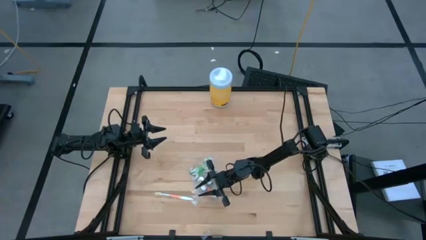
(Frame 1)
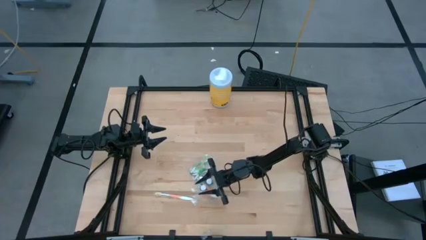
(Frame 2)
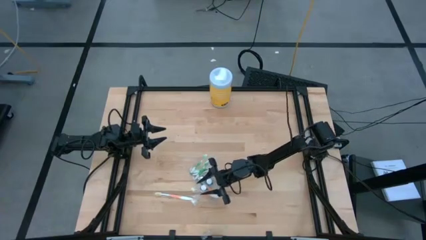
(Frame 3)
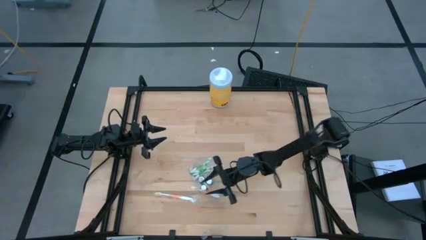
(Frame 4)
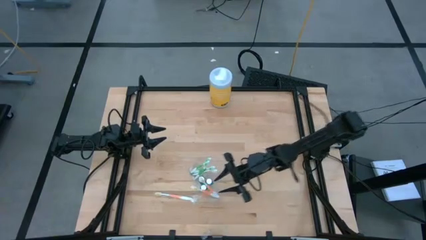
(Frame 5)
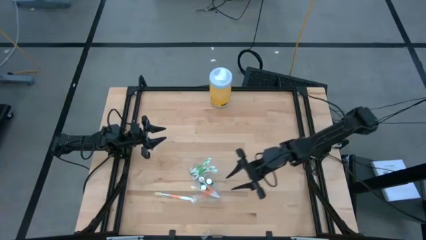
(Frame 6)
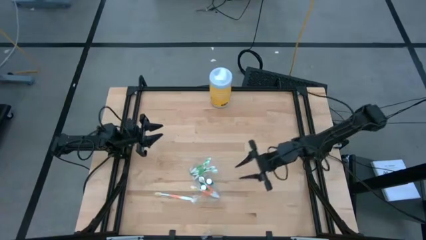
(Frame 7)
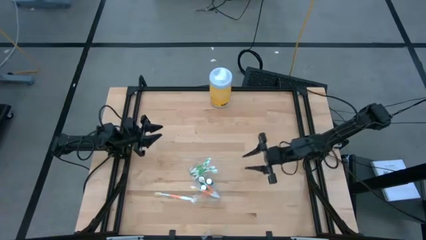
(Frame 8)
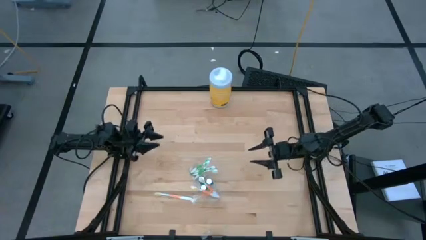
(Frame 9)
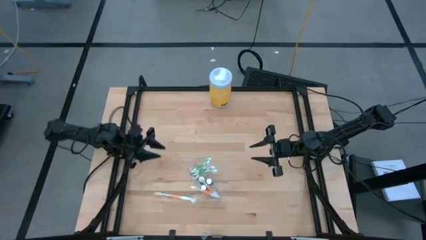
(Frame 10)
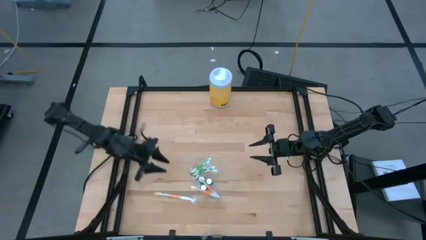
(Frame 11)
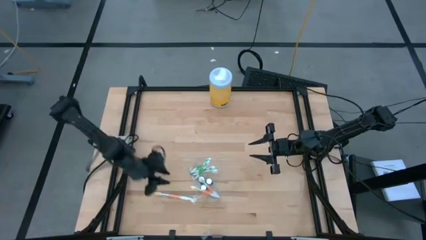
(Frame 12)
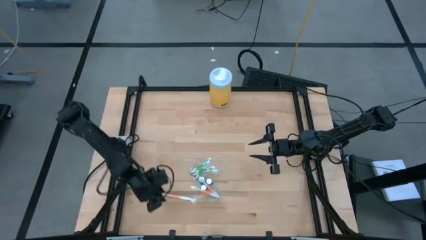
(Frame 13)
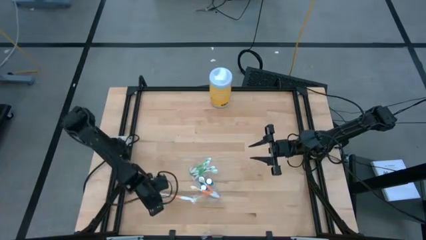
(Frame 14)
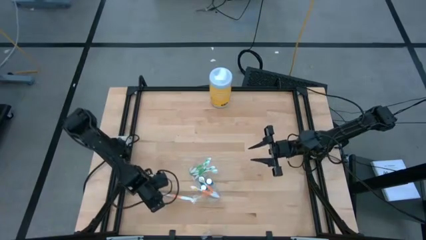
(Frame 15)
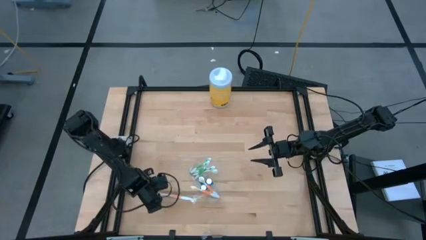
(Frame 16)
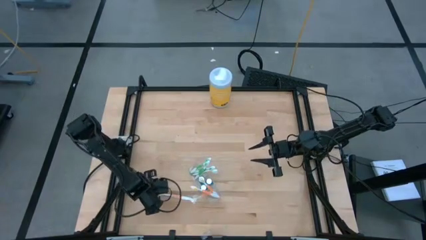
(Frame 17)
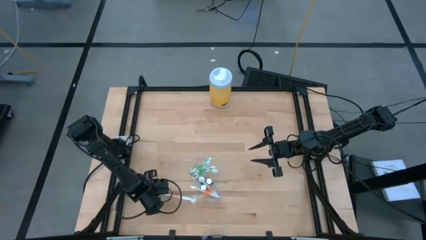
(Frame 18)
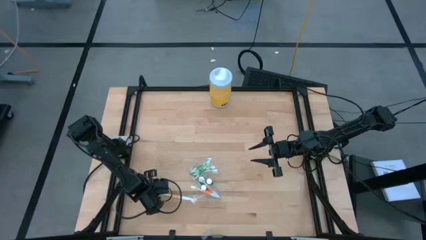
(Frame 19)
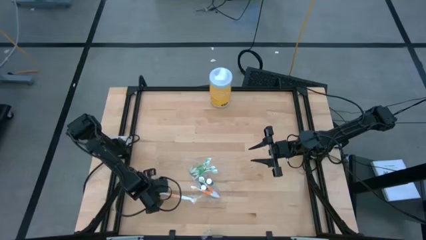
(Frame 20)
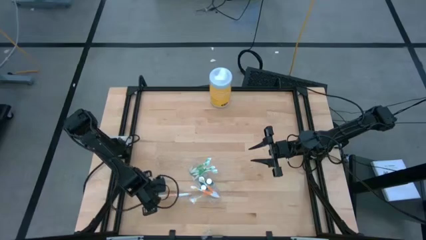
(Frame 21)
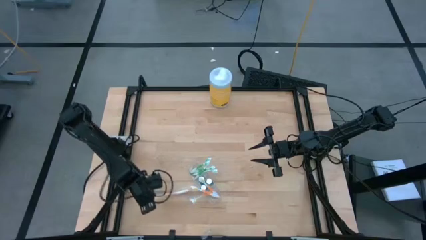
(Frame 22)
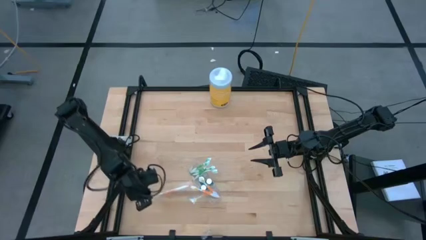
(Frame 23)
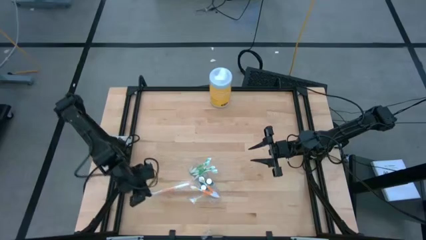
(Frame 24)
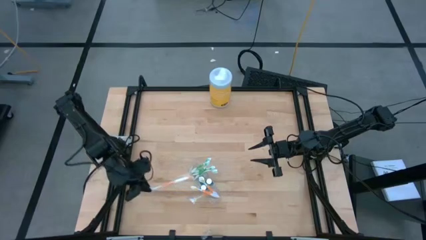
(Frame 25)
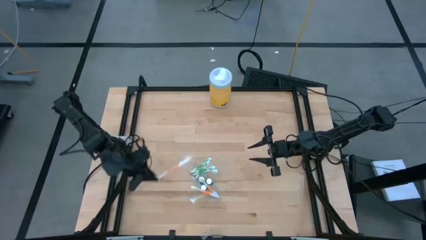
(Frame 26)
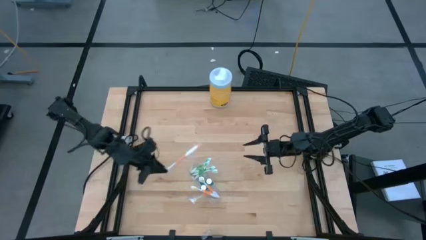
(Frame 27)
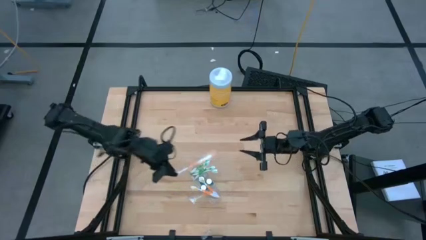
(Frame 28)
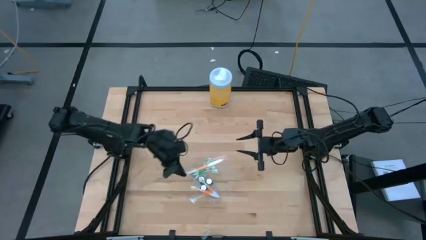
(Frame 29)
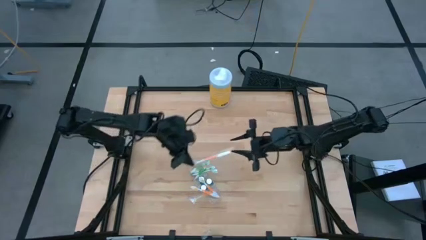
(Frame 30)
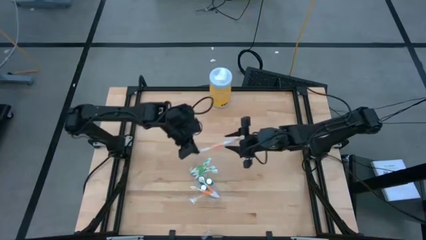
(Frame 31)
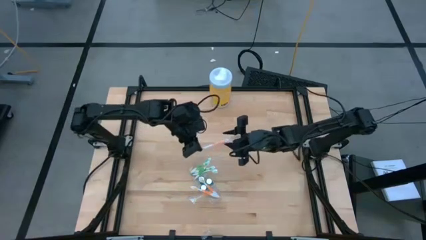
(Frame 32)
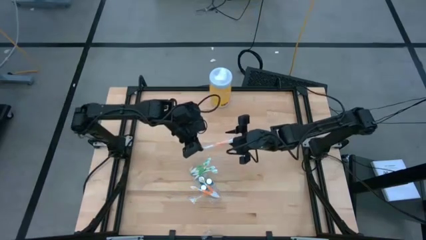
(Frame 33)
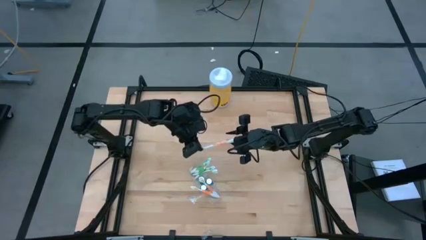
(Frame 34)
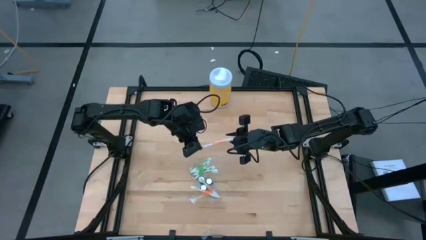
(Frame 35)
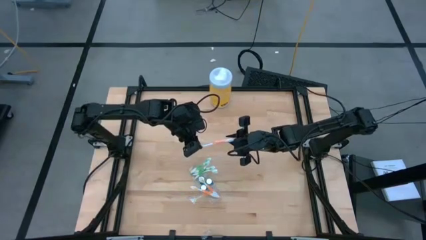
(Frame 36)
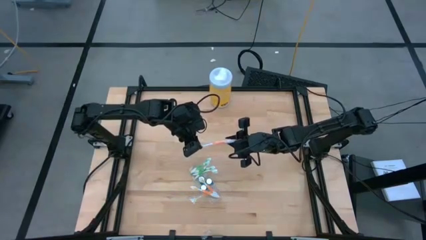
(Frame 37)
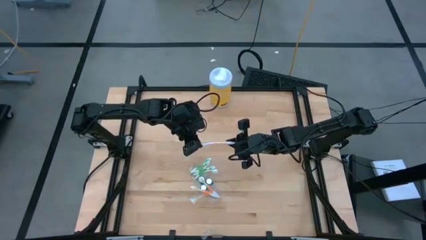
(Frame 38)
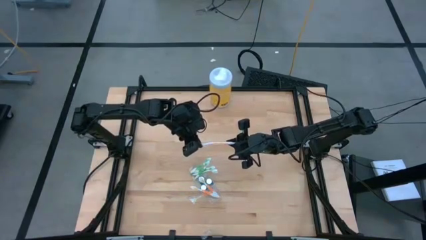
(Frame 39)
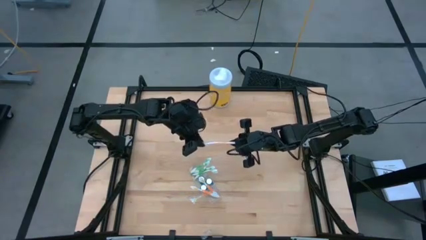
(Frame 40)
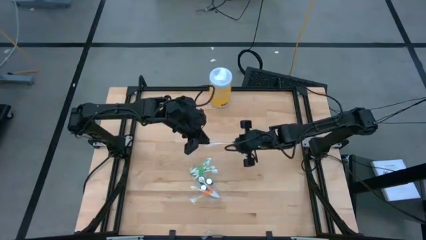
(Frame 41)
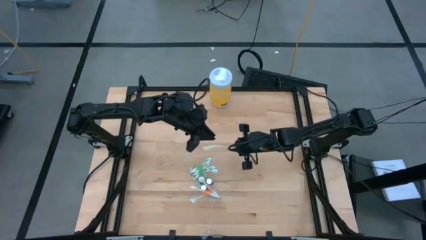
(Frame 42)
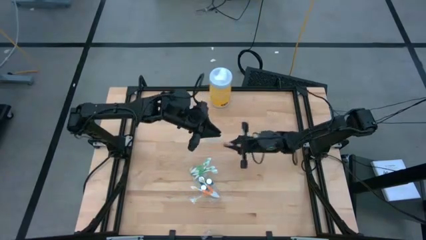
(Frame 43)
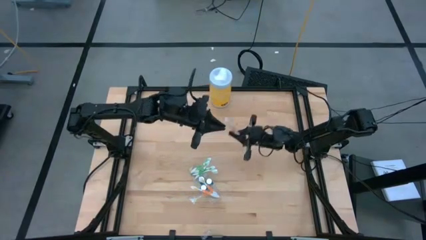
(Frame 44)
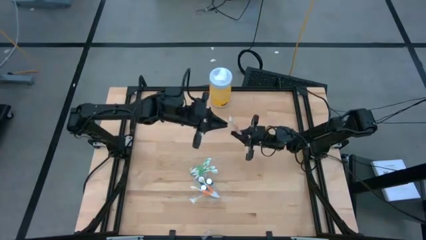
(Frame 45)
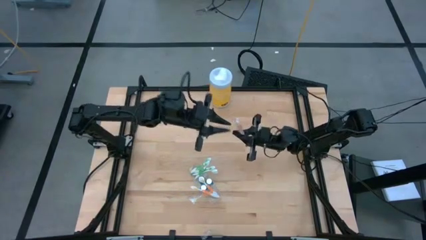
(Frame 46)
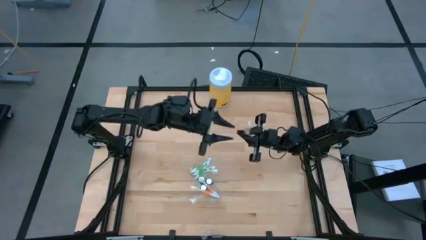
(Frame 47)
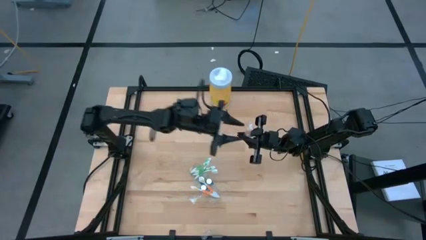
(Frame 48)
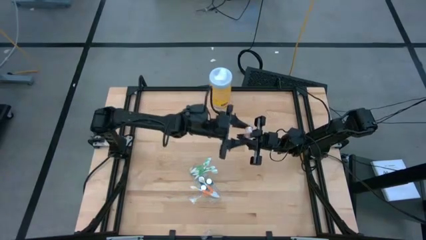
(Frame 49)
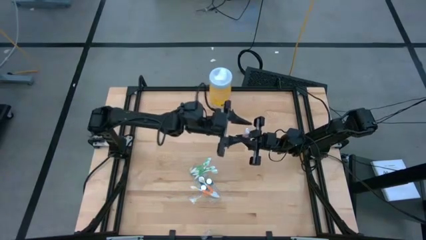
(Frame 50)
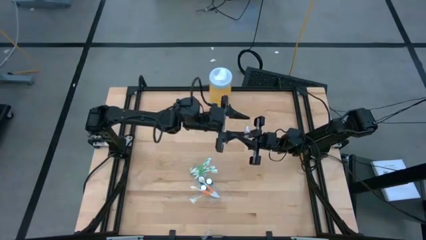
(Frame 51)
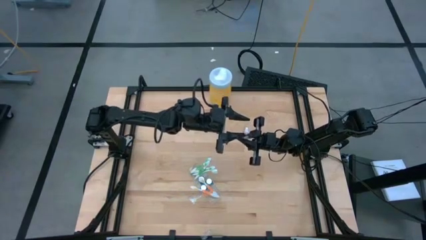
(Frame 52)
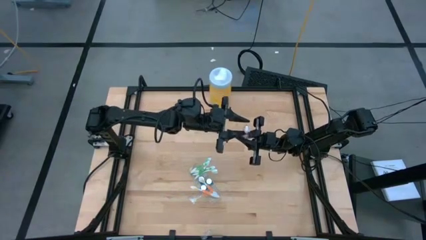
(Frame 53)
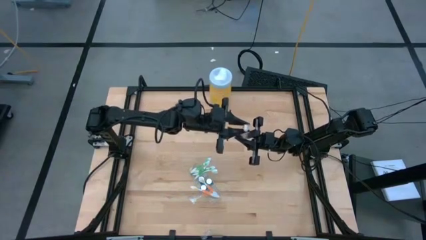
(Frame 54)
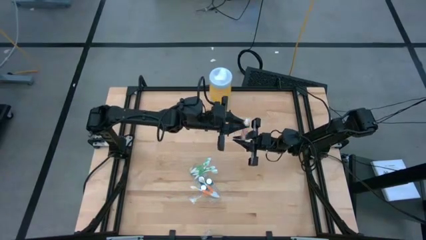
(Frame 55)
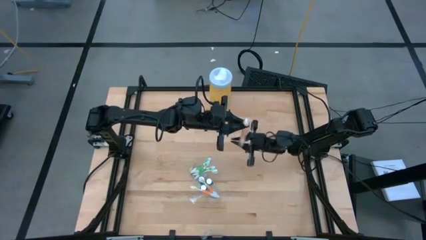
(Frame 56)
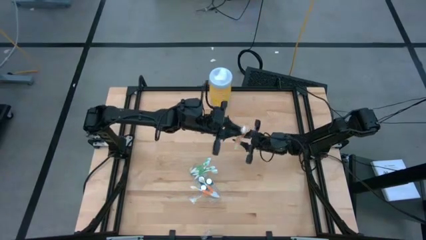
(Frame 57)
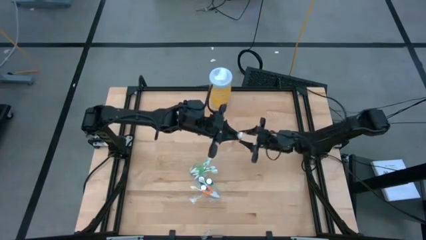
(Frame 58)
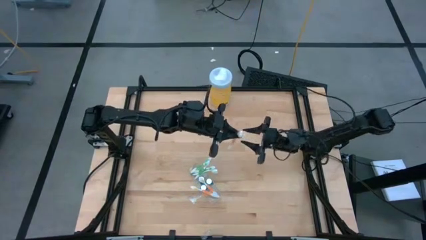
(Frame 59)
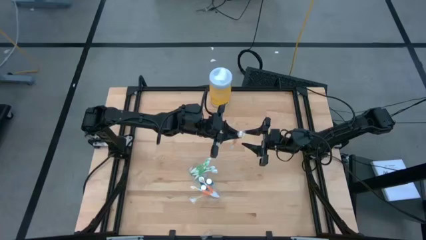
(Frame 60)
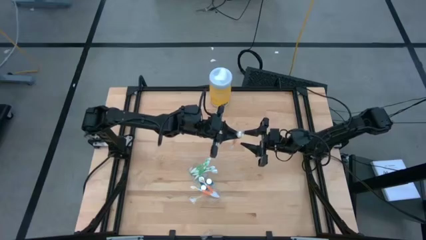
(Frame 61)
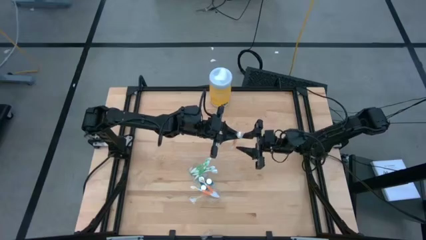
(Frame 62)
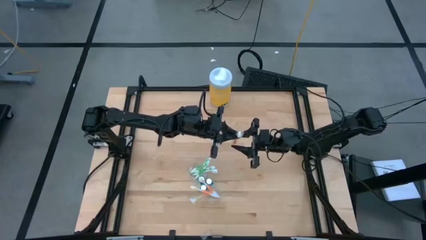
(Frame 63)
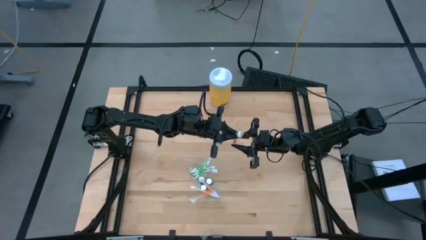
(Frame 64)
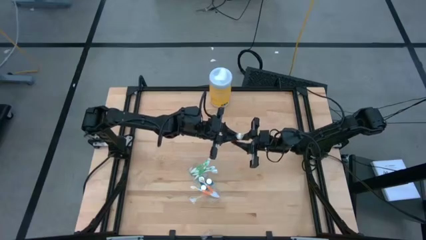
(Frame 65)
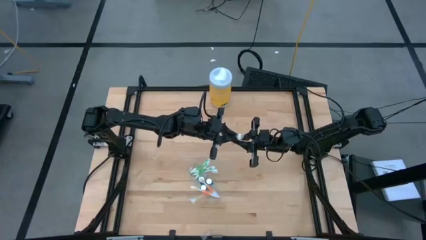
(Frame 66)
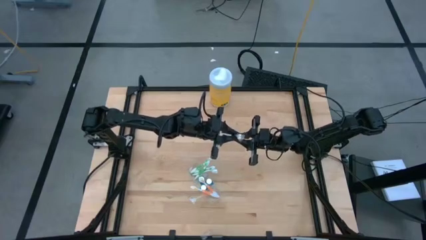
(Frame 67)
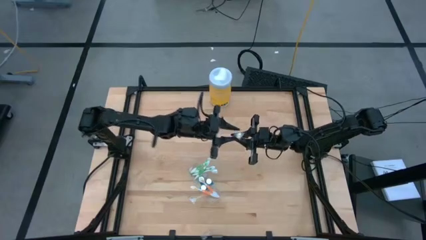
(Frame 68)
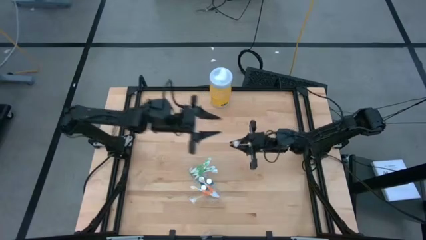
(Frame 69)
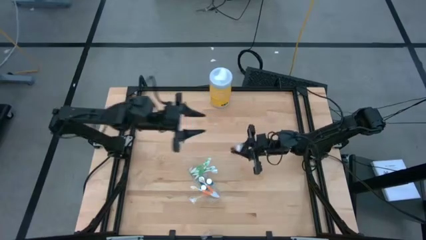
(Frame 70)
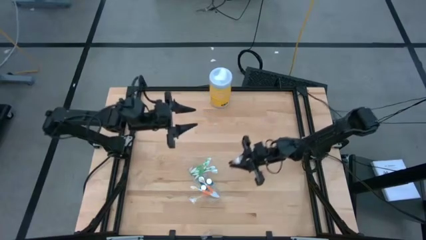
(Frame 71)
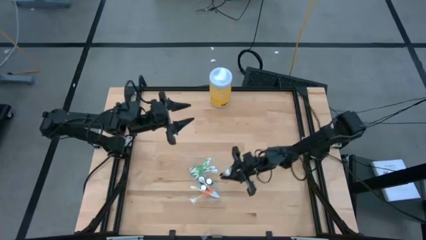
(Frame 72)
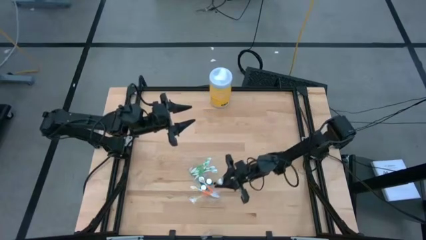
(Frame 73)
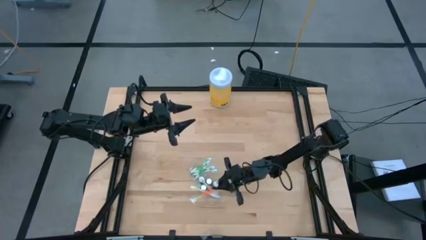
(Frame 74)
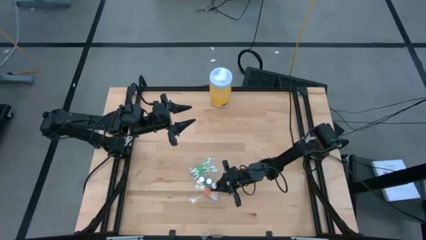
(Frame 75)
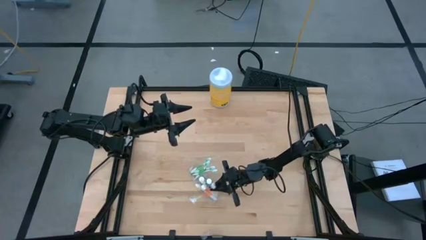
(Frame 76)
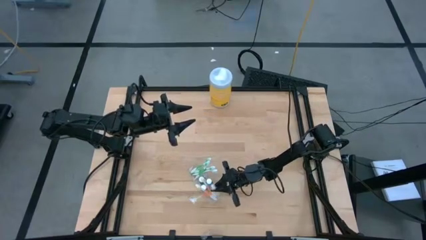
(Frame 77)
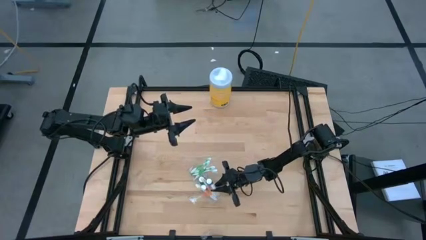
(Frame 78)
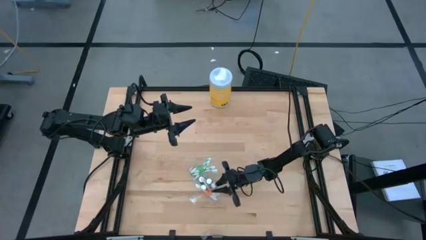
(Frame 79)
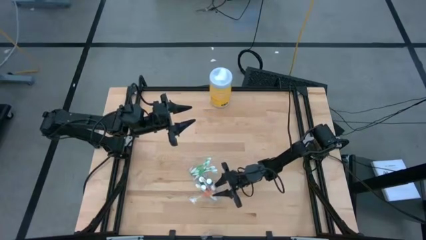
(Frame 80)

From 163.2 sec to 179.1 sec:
Task: Pick & Place toothbrushing station
Put the orange toothbrush into the transparent organizer

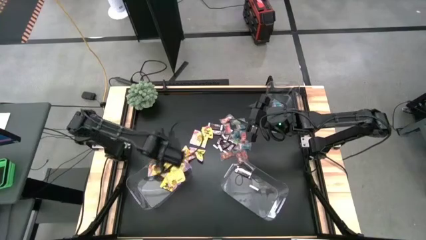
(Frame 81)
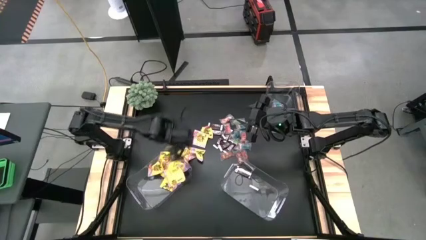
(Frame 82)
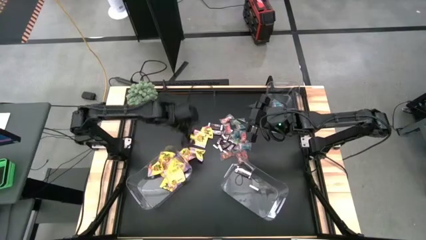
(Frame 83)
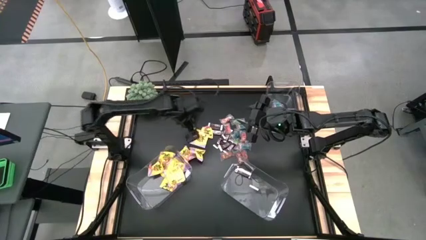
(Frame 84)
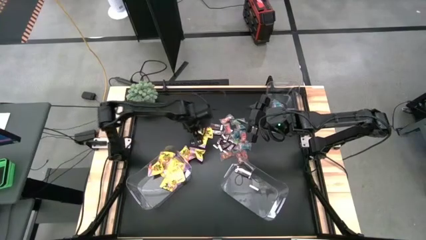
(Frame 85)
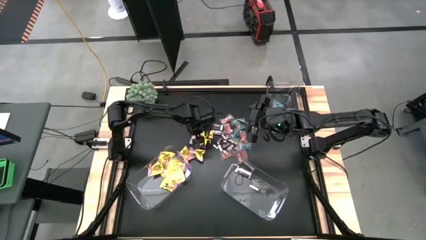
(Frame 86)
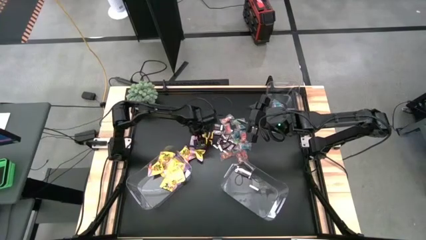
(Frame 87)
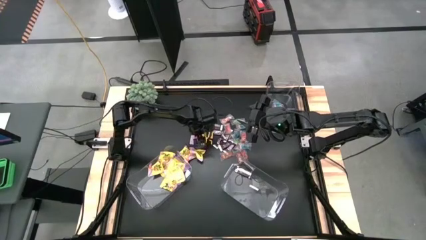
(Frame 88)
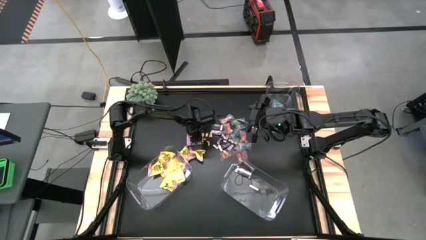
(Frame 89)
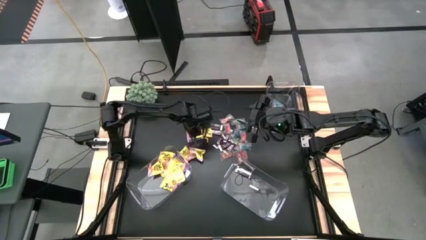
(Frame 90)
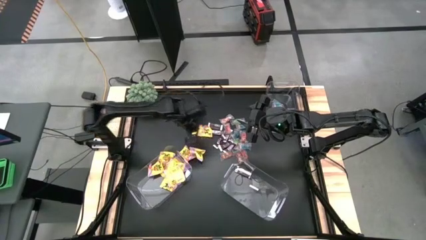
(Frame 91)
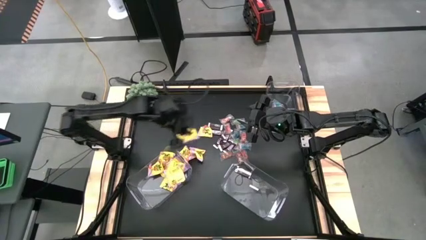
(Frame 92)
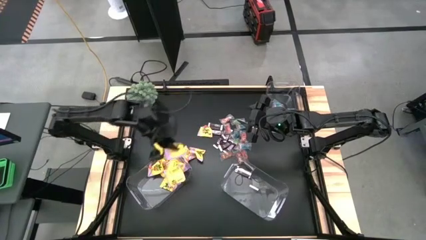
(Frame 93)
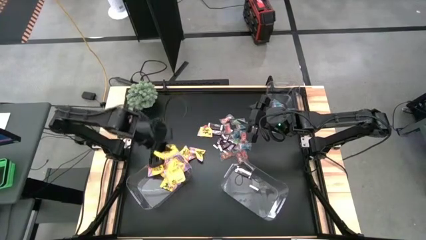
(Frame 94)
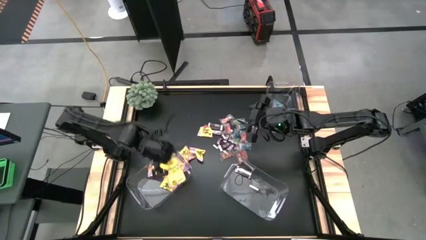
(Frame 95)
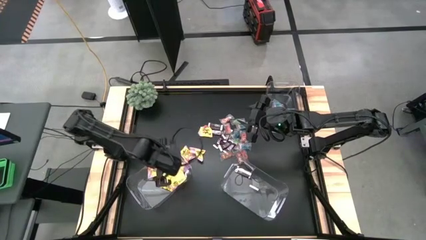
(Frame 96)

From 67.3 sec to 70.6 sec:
Task: Sort candy
Put the yellow candy in the bottom left transparent container
